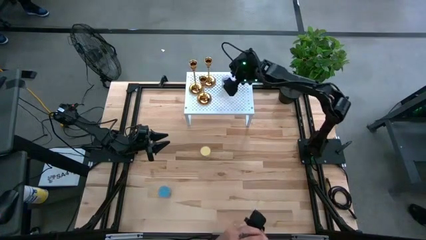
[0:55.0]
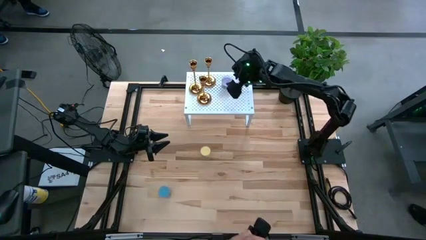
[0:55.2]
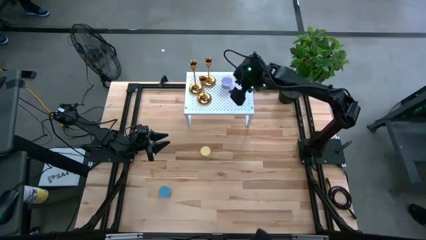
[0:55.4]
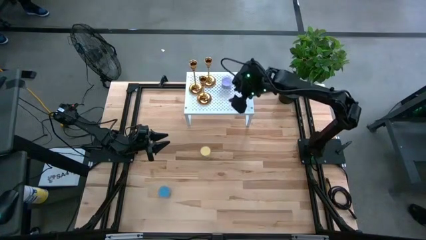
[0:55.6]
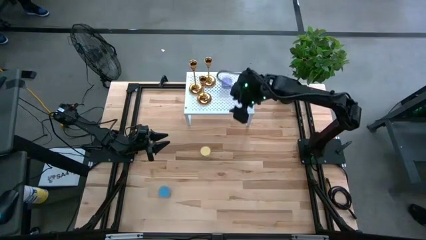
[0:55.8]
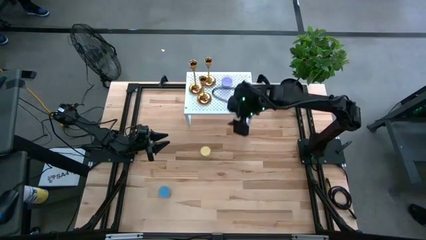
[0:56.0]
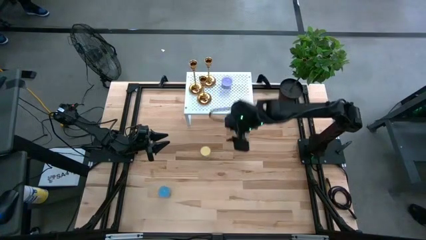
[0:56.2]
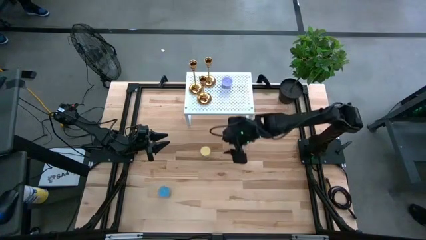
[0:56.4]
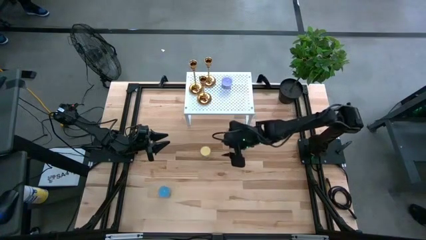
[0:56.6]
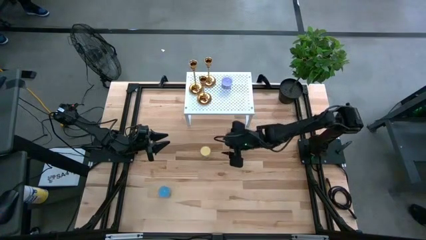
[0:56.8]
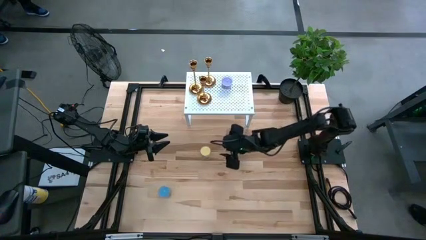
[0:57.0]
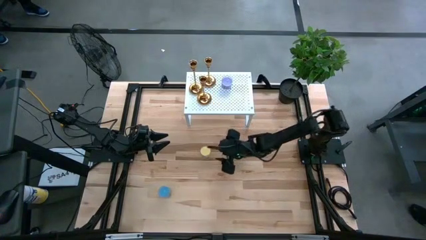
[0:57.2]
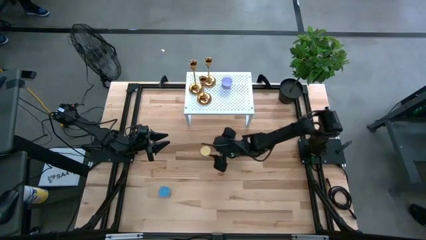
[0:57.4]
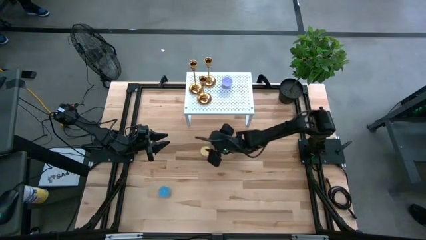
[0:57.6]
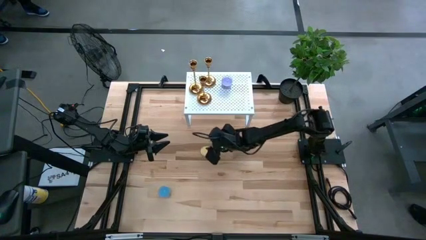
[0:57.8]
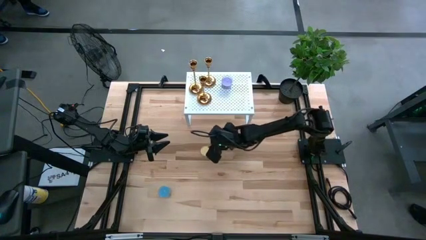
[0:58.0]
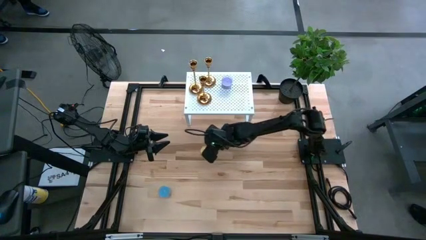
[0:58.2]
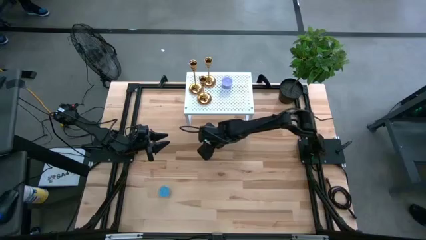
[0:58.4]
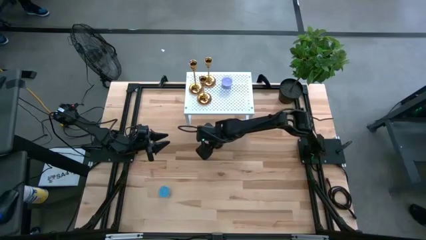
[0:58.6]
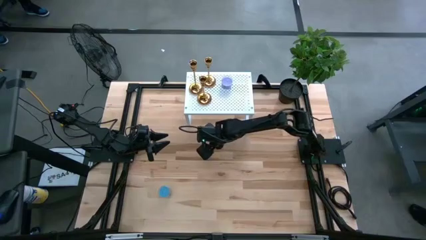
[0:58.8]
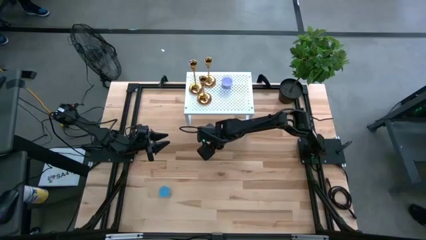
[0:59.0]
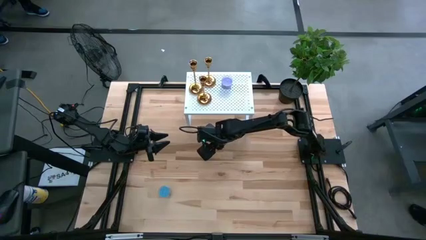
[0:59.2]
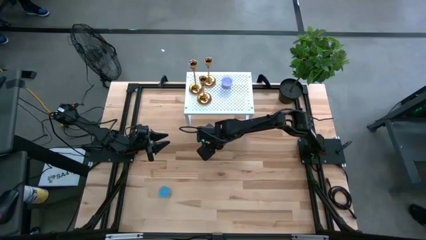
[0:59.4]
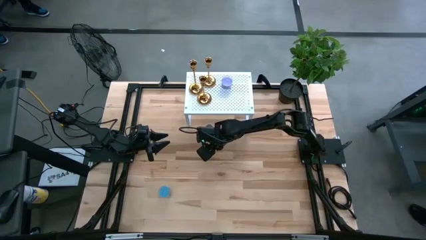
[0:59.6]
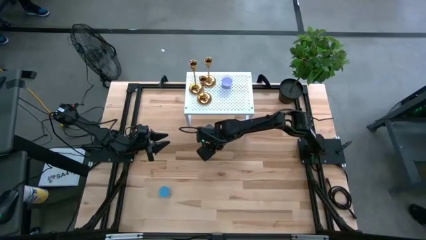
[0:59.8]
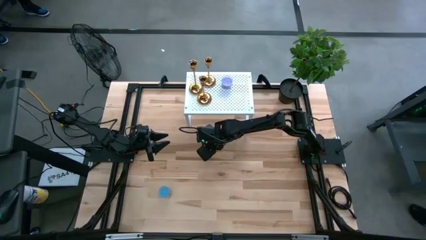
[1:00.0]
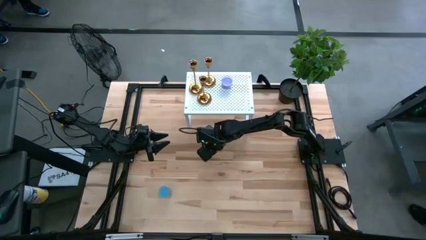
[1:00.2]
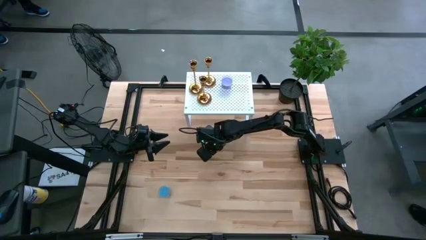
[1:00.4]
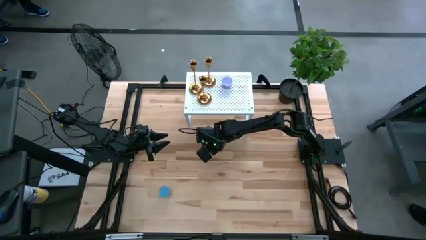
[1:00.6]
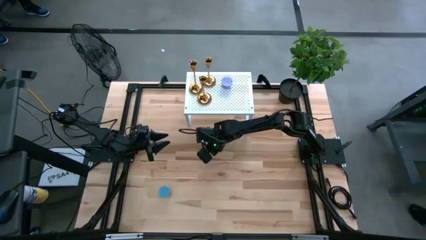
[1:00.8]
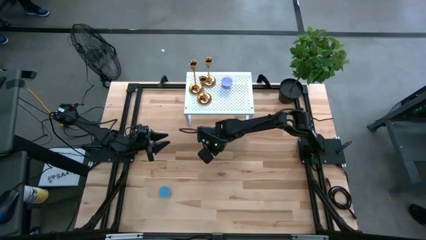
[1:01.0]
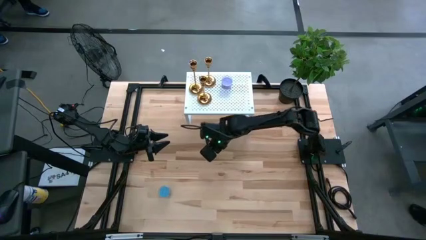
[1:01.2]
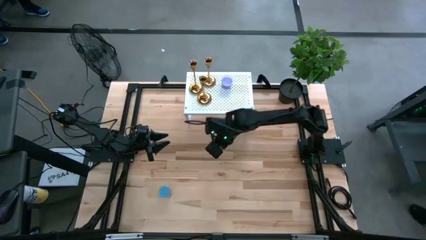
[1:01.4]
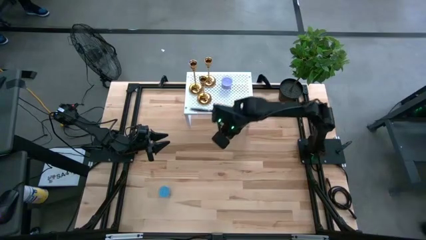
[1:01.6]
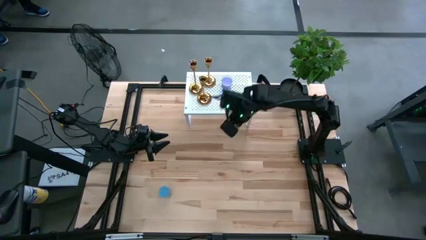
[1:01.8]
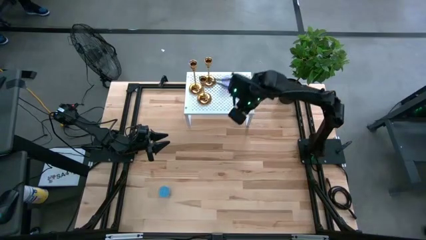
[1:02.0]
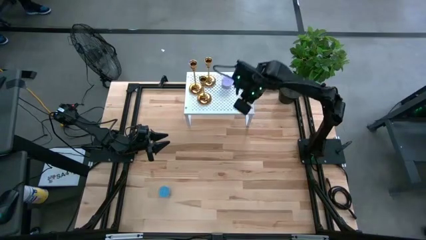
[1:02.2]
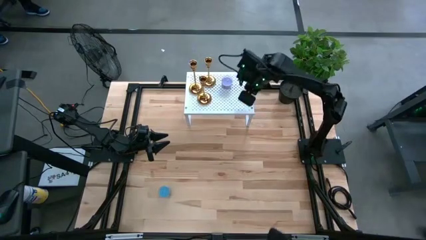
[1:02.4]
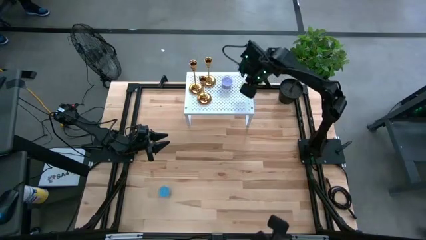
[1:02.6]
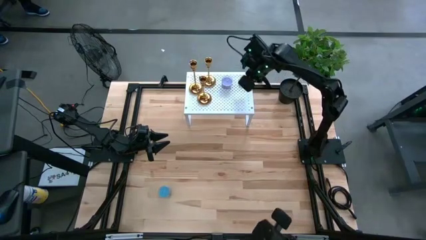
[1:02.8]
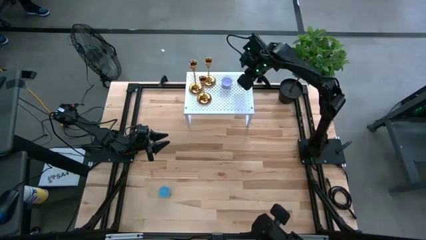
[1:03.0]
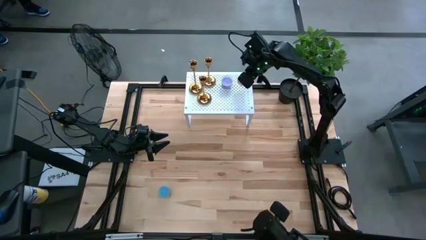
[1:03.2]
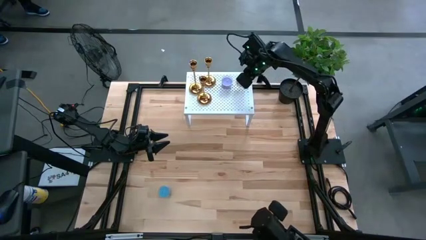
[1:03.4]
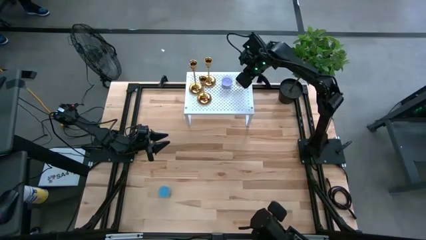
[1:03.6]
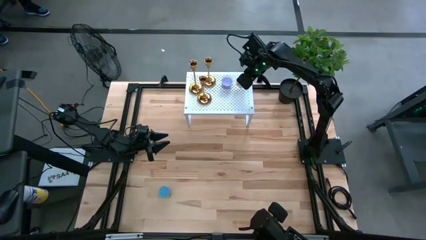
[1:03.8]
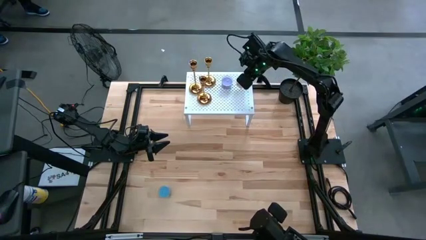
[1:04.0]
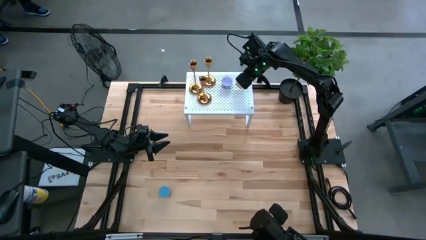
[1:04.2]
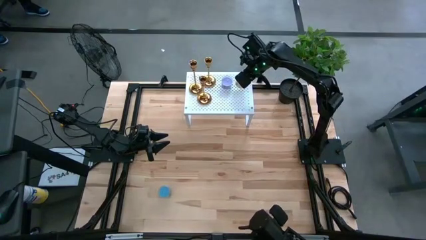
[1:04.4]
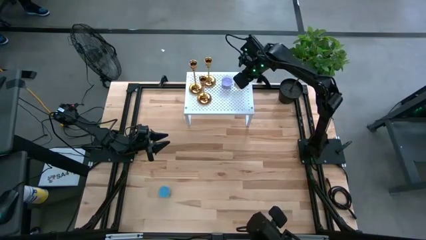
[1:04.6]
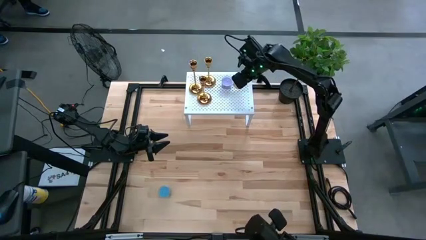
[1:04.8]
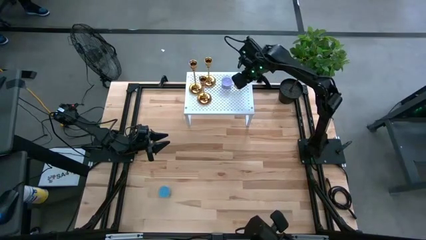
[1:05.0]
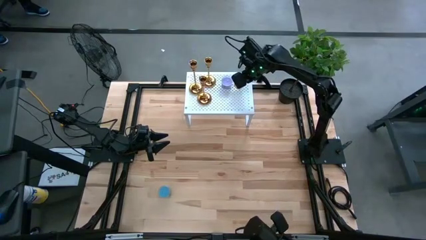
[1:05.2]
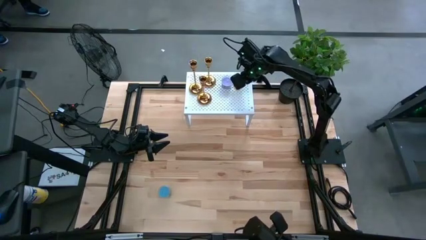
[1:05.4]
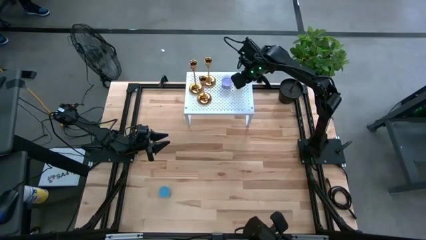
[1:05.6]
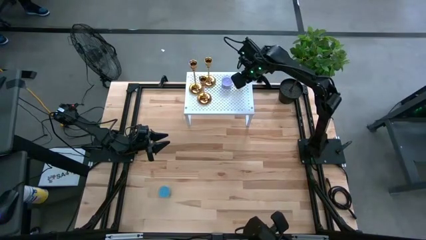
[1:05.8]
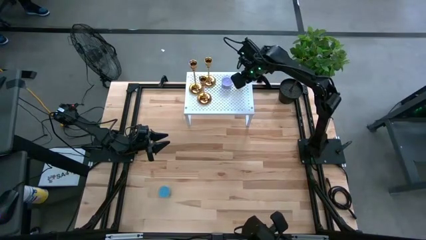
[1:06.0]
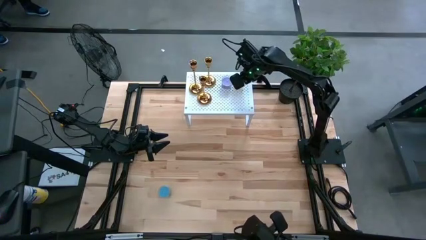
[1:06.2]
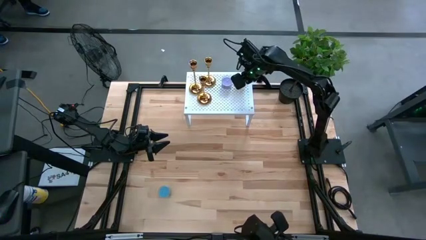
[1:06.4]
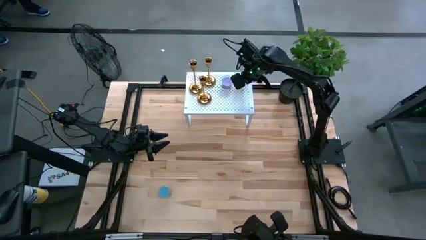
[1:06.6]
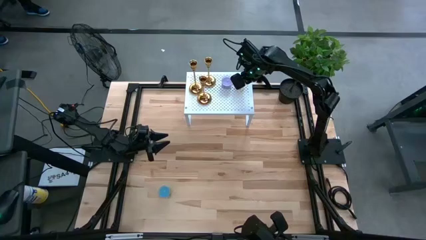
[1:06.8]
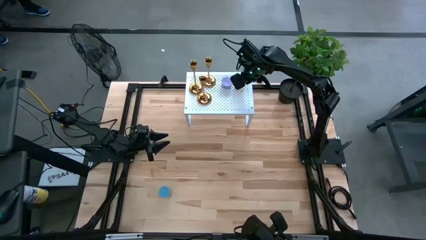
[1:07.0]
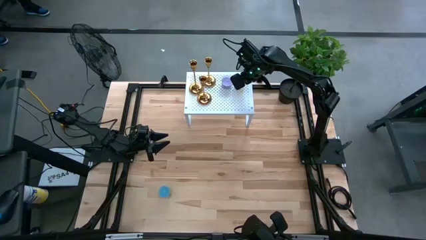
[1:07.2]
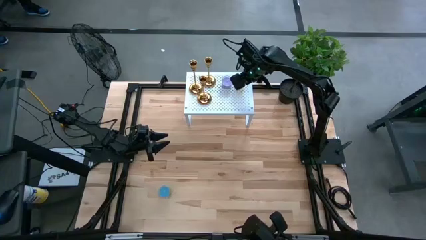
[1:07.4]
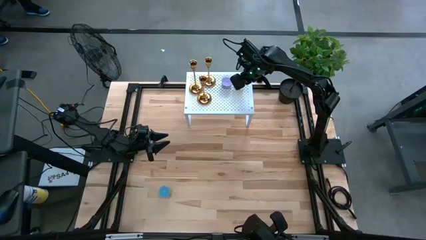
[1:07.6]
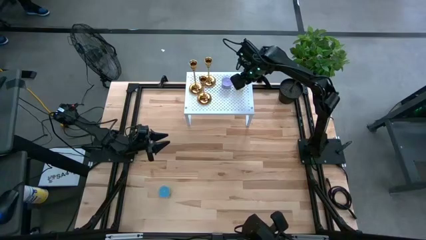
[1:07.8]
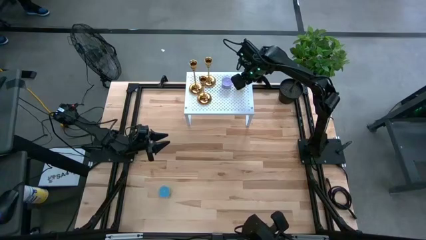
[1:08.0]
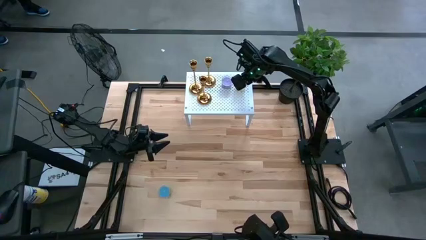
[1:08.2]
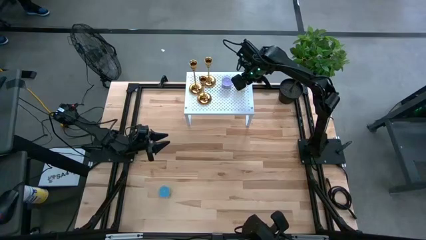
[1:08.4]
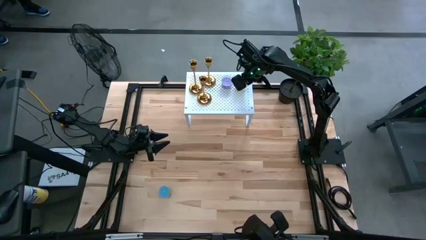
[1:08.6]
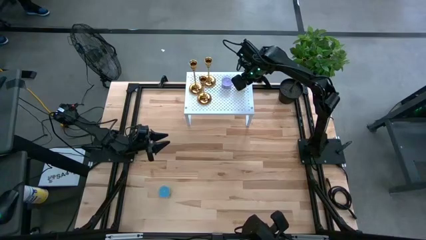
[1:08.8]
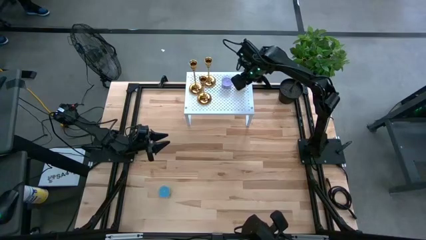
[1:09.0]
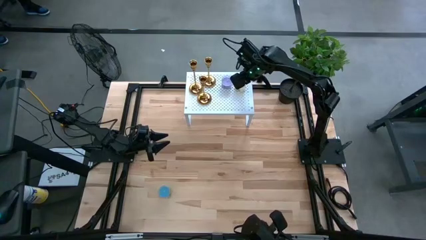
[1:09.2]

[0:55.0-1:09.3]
Task: Pick & Place candle stick holders
Put the yellow scented candle on the shelf

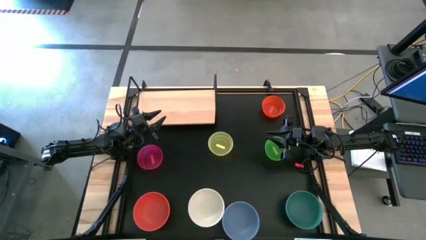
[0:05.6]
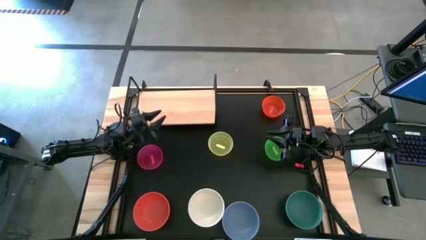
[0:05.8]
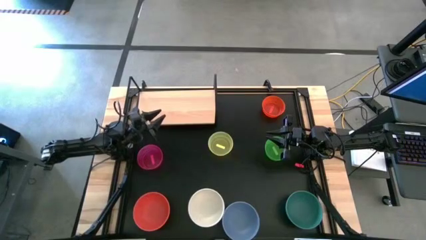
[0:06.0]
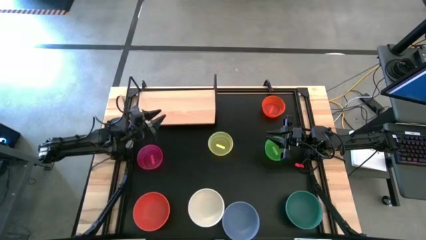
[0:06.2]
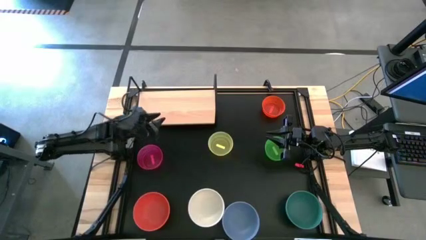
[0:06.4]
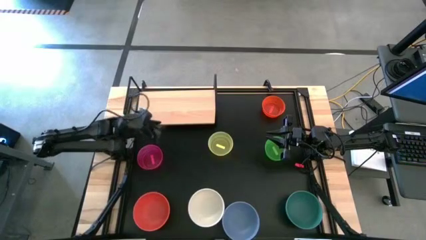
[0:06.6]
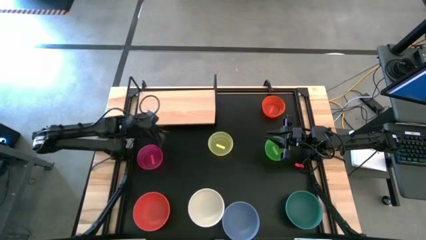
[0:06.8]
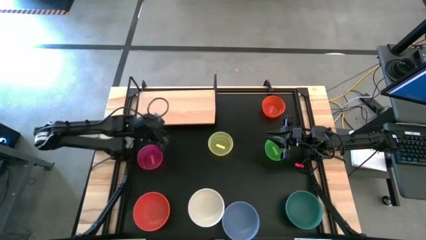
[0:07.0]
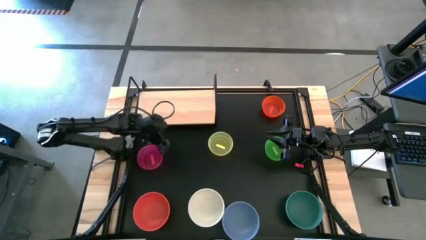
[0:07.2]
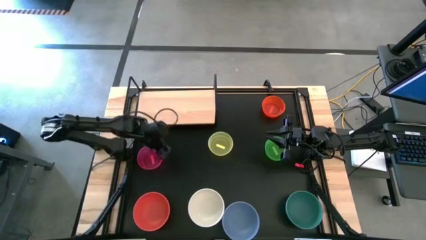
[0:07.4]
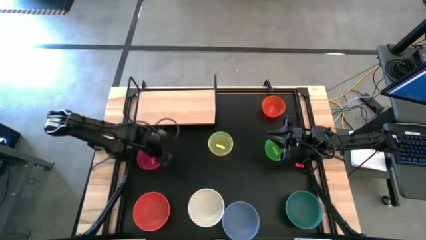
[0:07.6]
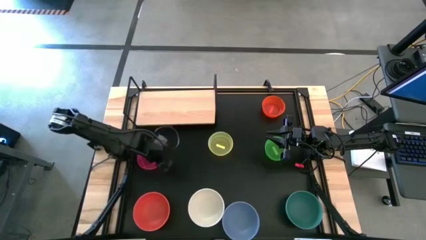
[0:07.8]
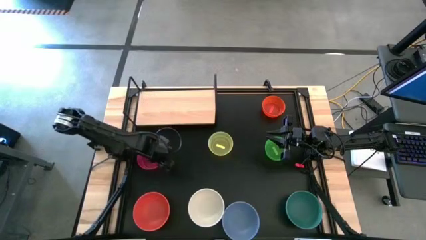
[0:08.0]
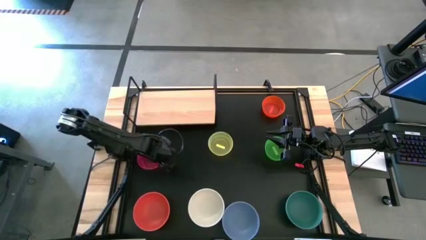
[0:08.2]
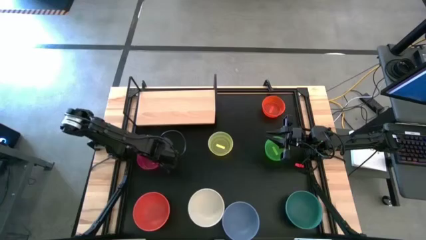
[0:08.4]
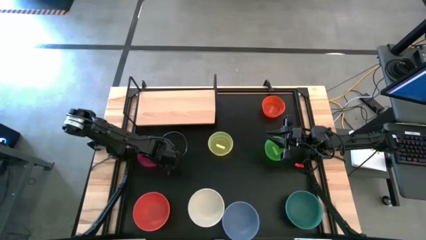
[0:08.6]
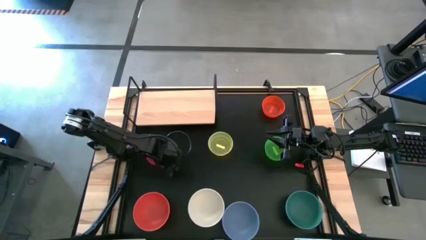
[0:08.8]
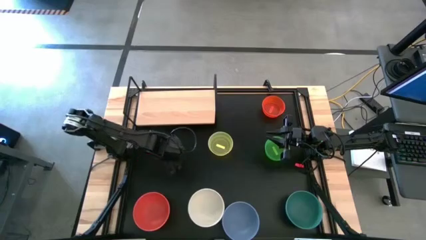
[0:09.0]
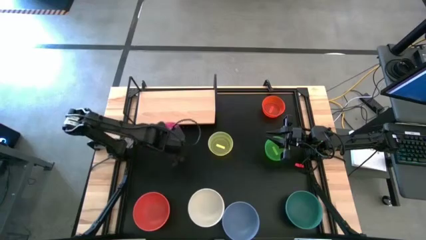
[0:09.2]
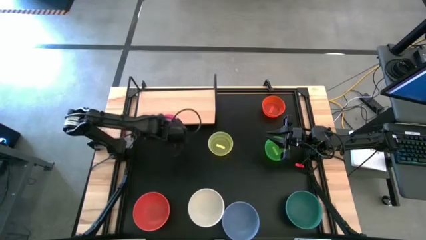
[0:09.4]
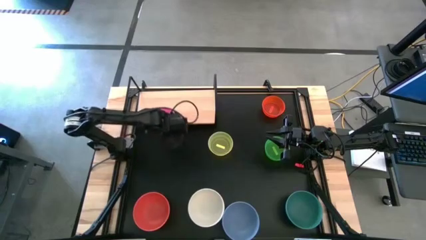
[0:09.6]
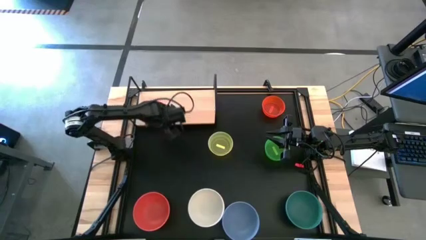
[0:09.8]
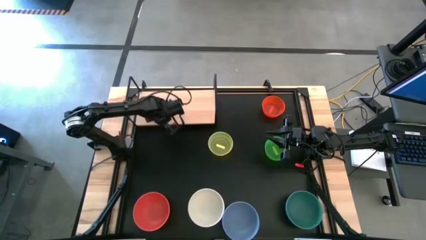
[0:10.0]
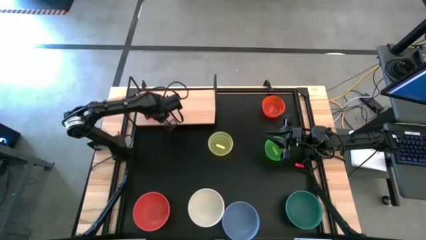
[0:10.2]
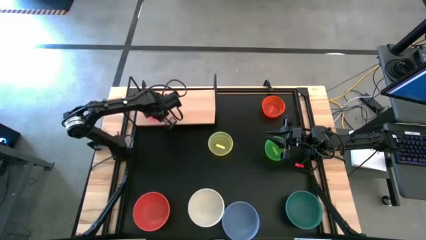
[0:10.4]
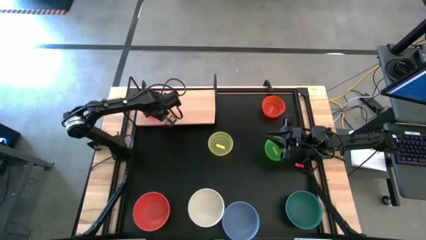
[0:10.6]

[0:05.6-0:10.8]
Task: Place and stack bowls onto a shelf
Put the pink bowl on the shelf
